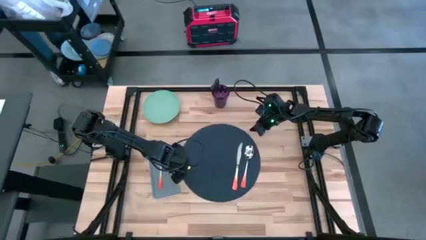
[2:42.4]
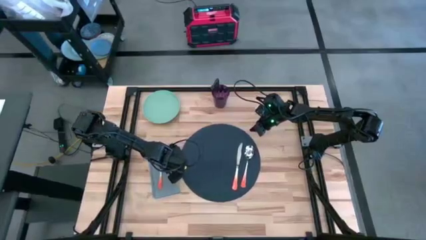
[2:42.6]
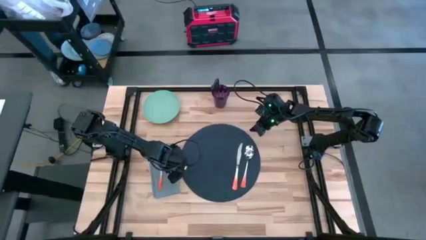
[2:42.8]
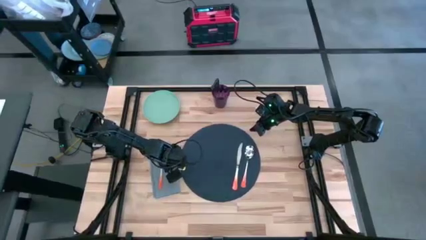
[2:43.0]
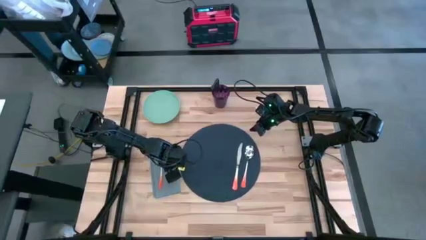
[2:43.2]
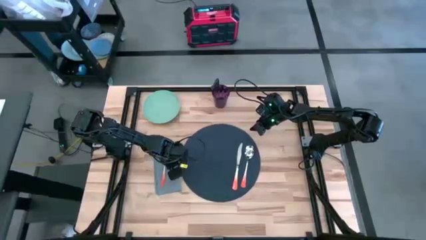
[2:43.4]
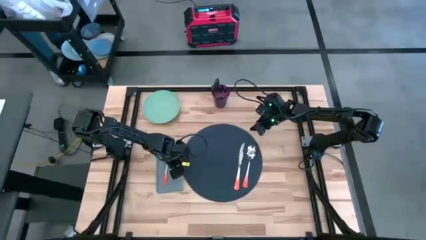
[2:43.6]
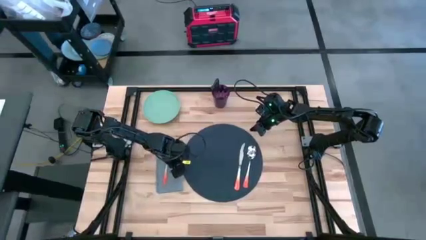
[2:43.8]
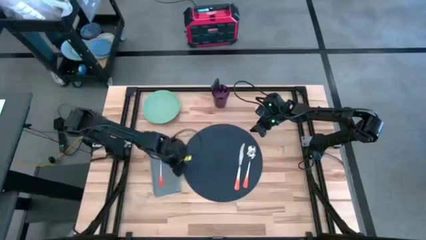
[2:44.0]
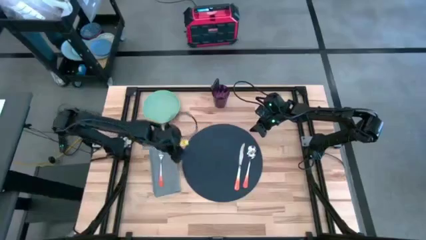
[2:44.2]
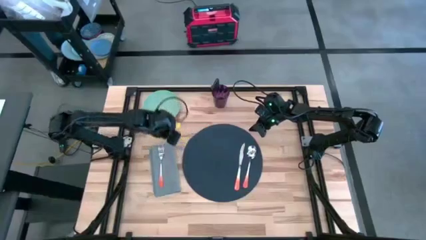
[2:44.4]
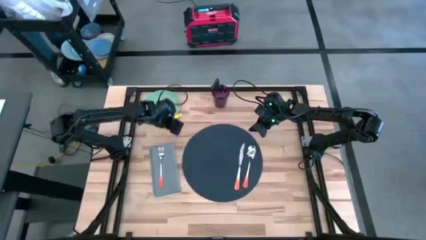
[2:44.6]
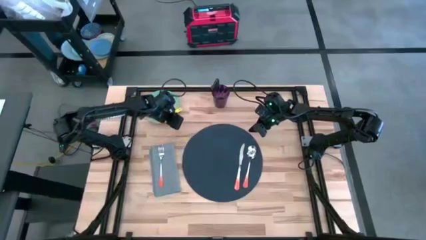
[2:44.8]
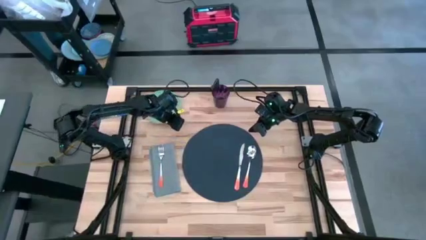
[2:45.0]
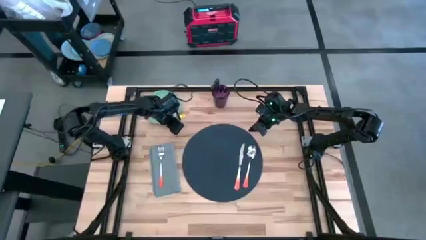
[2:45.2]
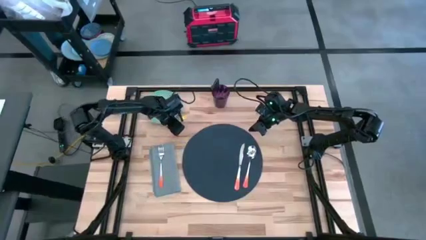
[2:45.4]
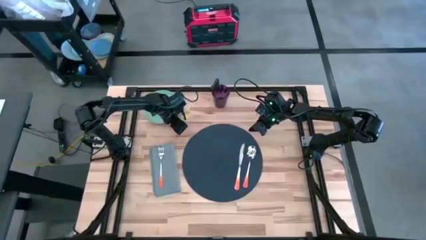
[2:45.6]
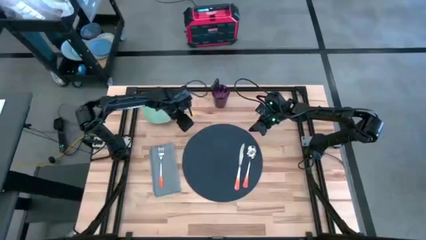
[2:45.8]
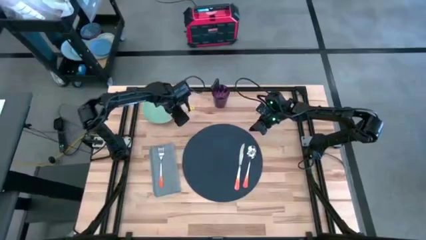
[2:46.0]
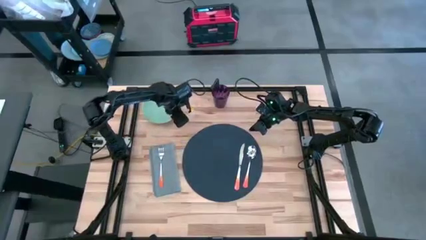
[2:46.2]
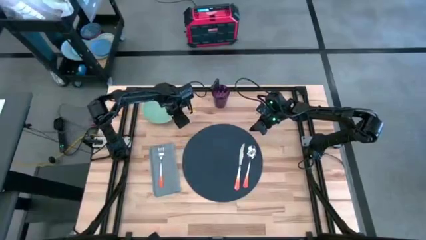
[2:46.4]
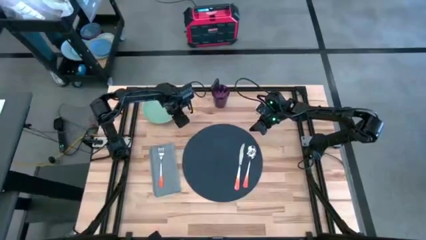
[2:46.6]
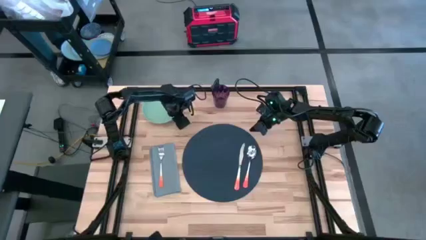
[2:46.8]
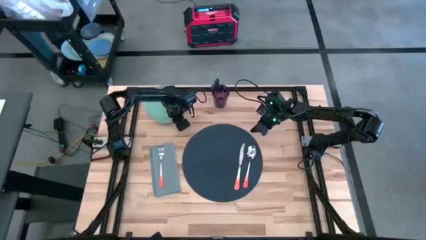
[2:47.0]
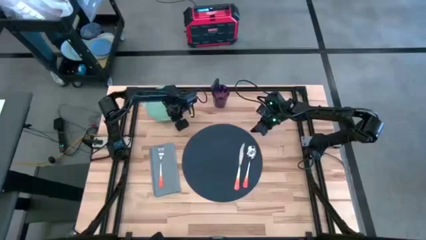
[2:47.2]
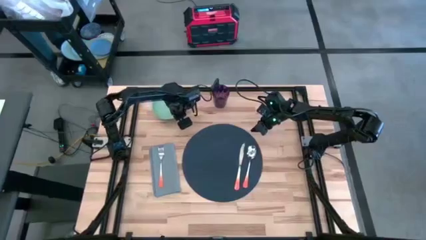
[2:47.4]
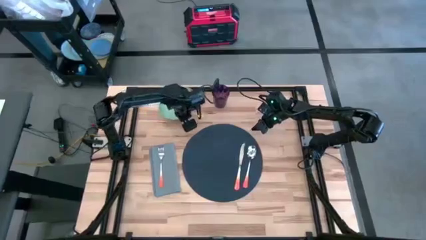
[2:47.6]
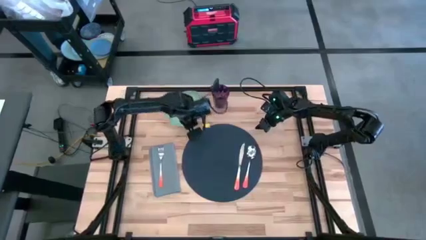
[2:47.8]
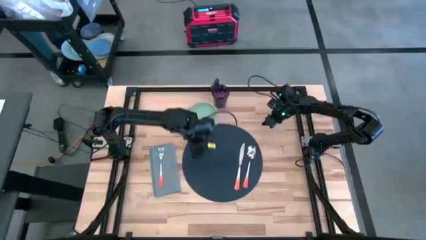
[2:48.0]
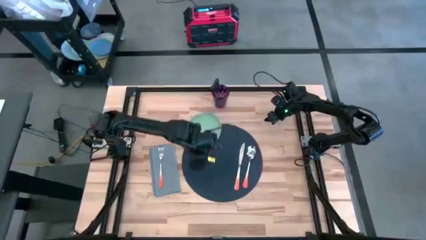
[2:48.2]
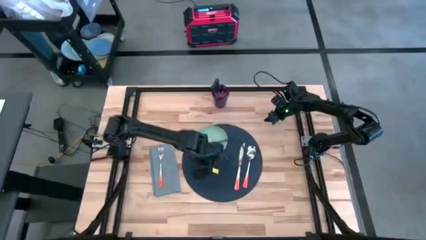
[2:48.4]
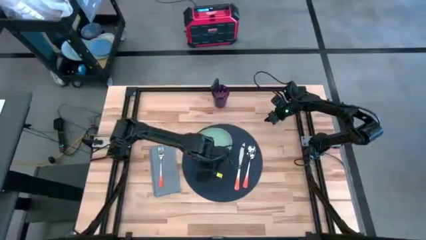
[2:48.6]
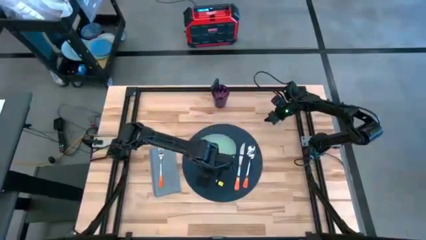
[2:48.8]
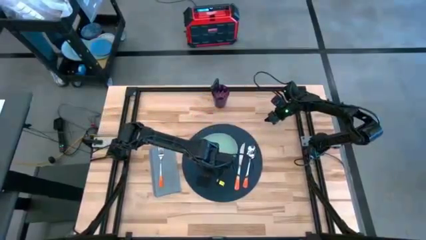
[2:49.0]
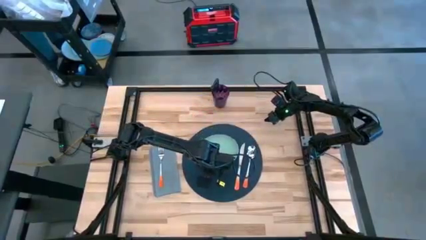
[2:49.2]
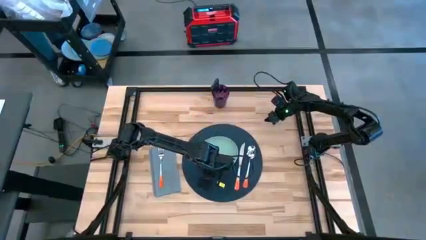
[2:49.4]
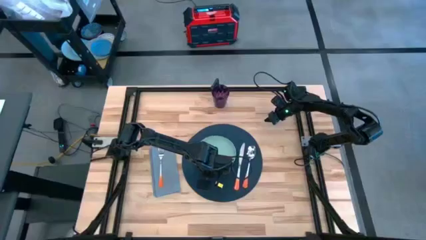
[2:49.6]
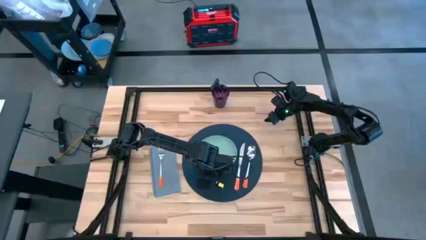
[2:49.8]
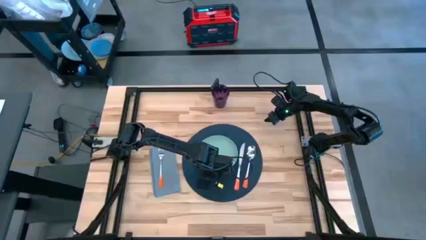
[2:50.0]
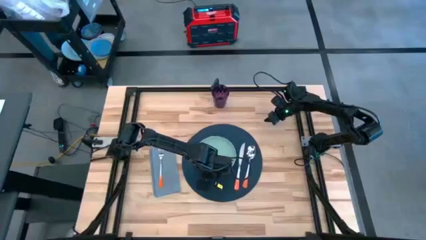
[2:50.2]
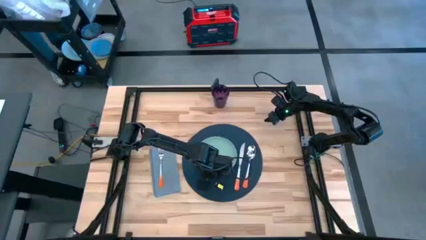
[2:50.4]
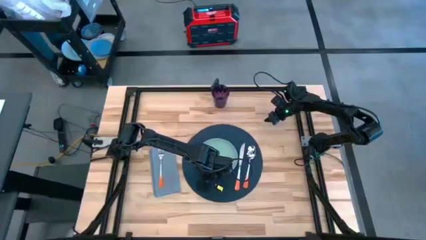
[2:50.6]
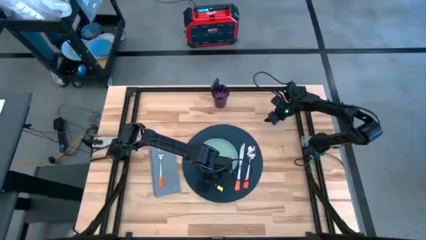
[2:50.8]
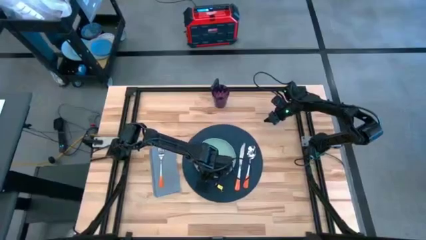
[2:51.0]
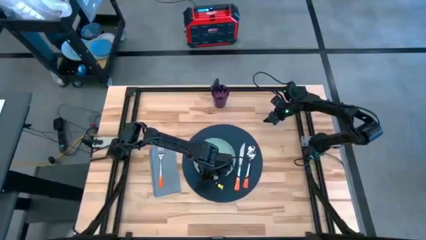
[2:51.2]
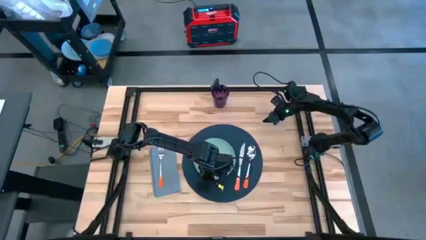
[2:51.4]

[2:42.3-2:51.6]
Task: Set table place
Put the green plate on the table mat

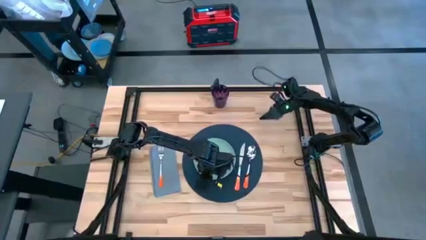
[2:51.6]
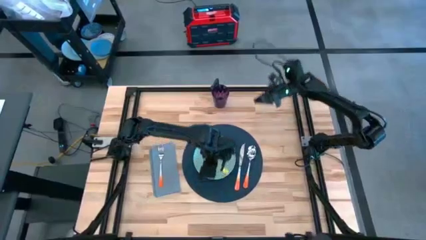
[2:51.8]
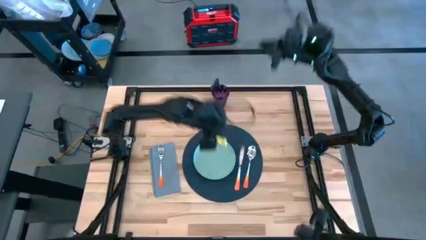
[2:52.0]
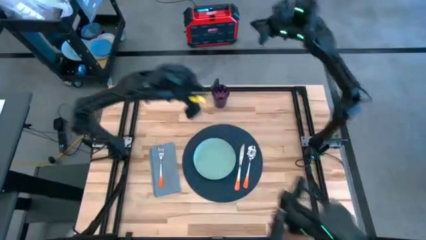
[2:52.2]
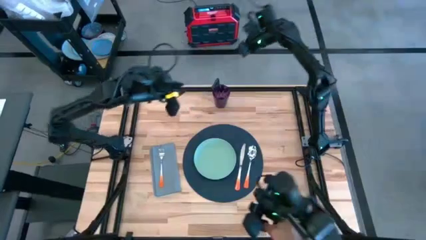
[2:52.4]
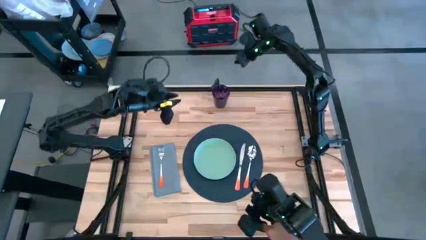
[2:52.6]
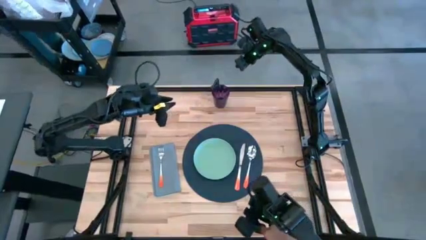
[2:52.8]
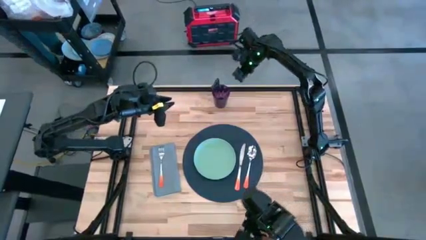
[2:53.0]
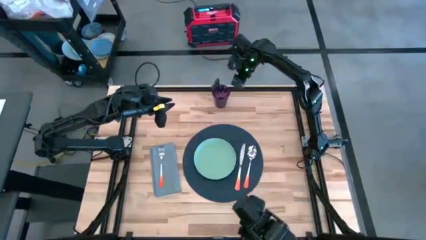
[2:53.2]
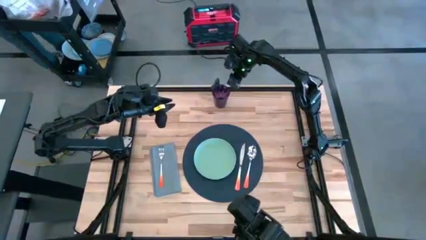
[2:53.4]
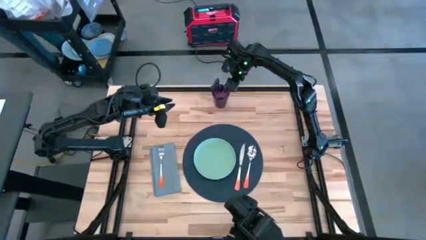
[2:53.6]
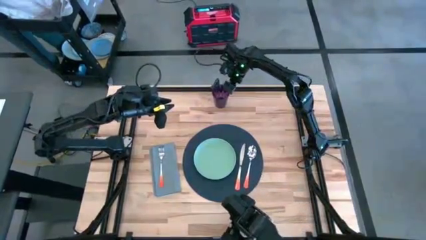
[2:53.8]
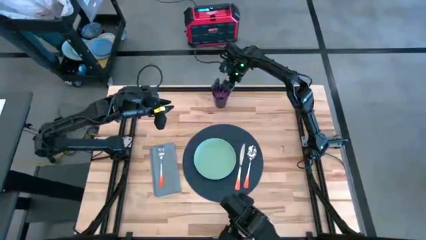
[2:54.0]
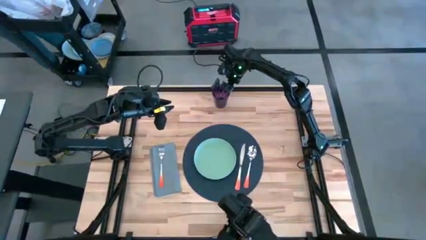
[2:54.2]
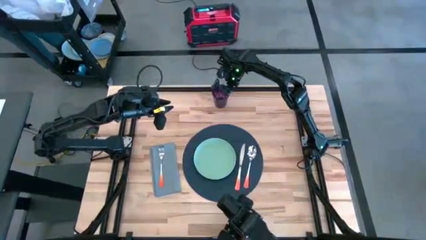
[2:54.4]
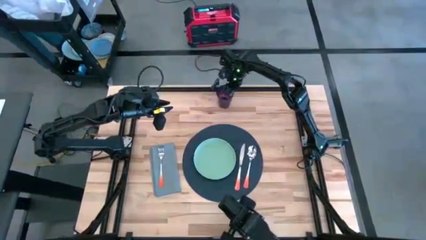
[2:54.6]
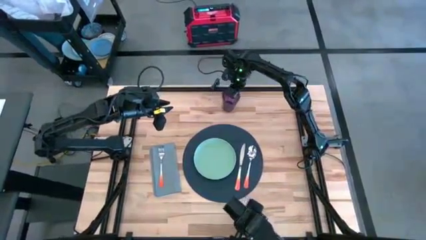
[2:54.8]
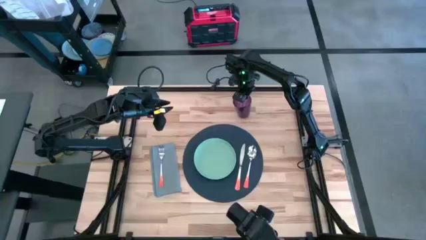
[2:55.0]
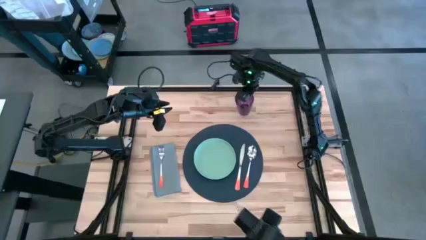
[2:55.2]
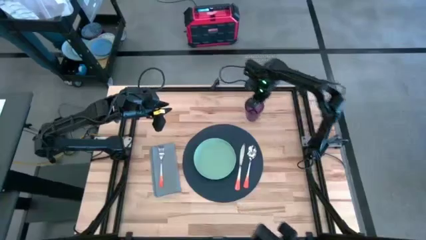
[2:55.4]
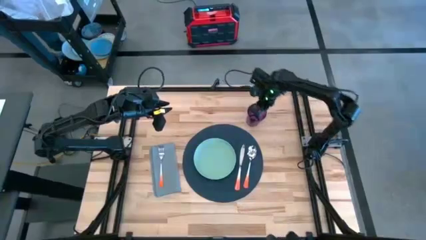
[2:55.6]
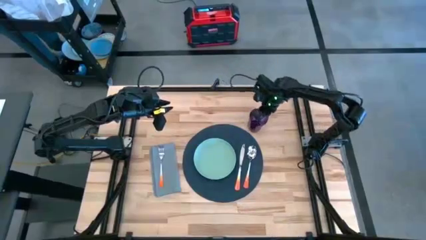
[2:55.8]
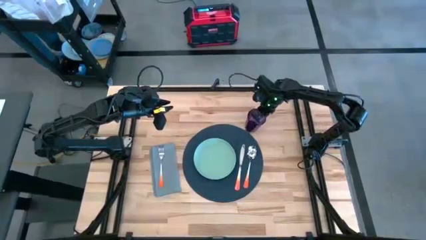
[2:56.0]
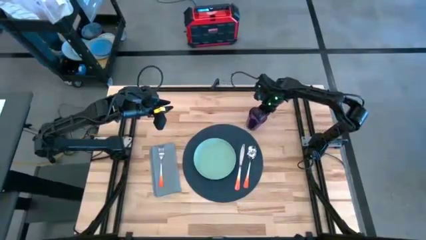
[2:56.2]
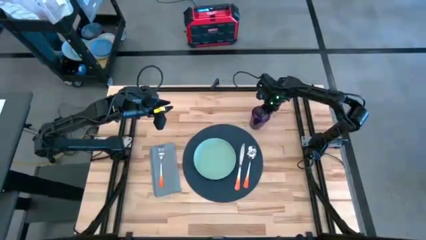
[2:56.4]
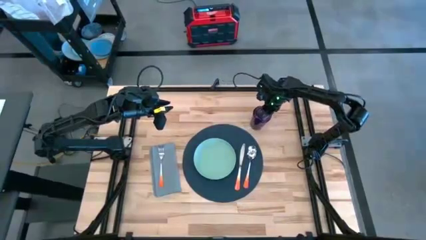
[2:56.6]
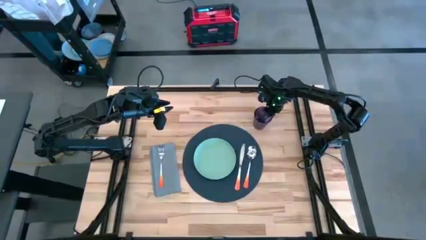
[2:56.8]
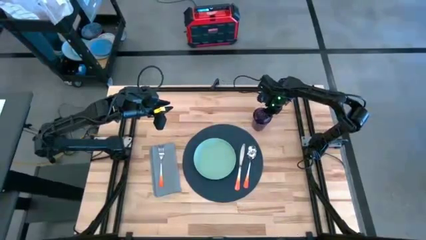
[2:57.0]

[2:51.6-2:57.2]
Put the purple cup to the top right of the table mat

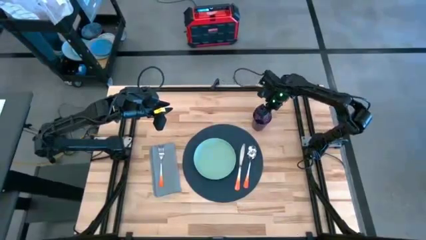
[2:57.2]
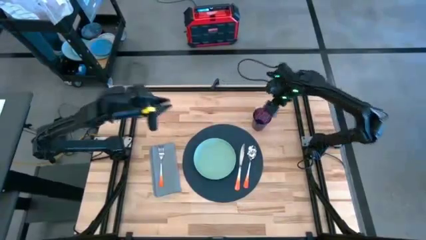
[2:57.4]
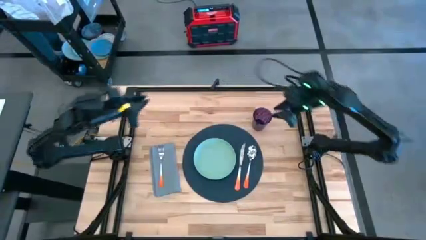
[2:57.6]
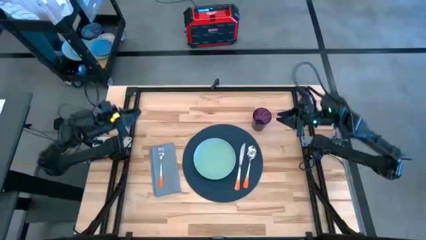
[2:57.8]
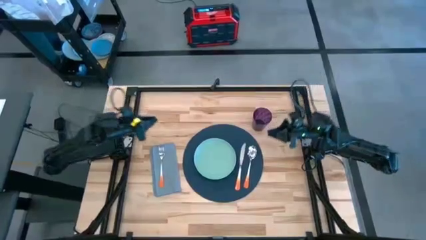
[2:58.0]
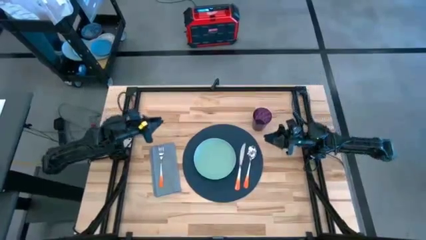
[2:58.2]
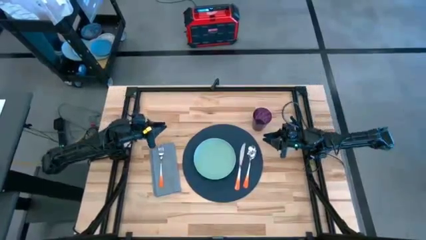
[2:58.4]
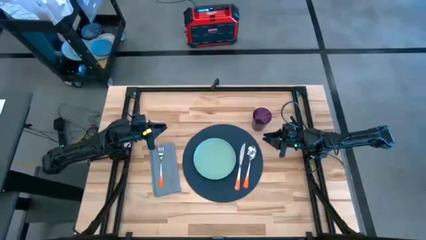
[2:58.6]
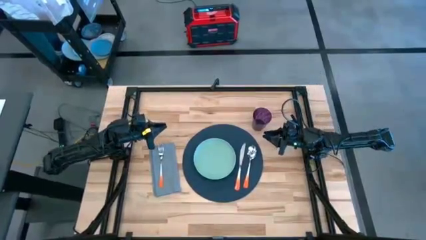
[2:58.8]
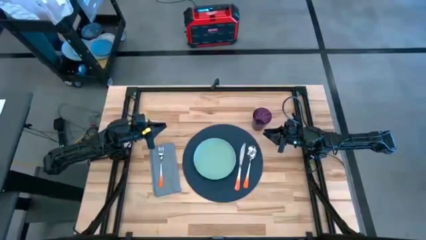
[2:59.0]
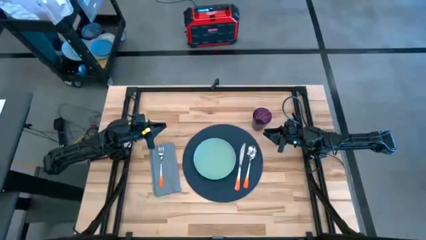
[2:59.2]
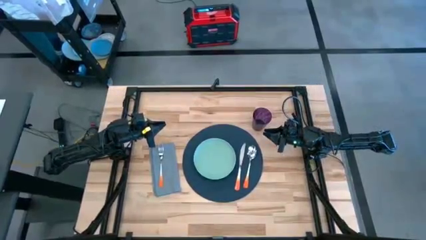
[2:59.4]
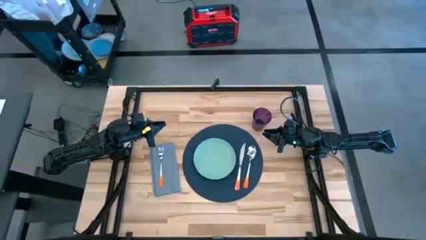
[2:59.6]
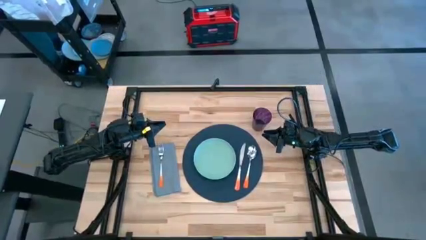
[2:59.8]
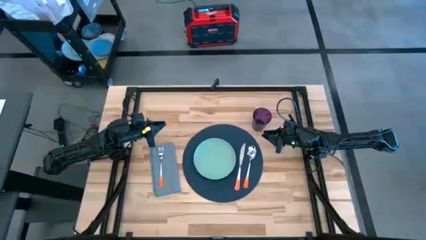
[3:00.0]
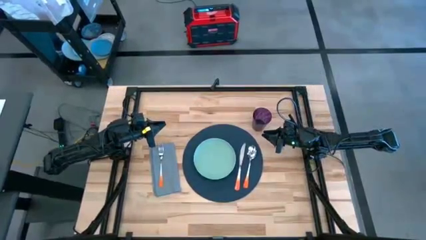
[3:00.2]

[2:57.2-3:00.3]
Return to Home Position
